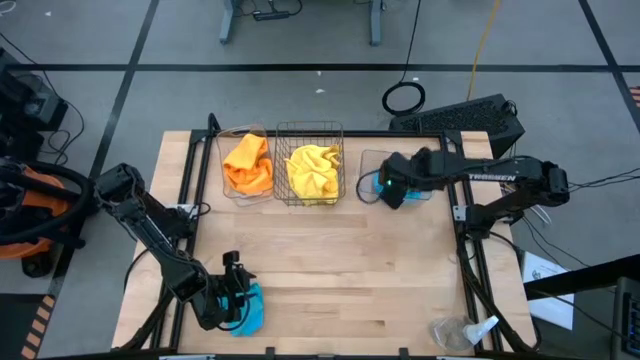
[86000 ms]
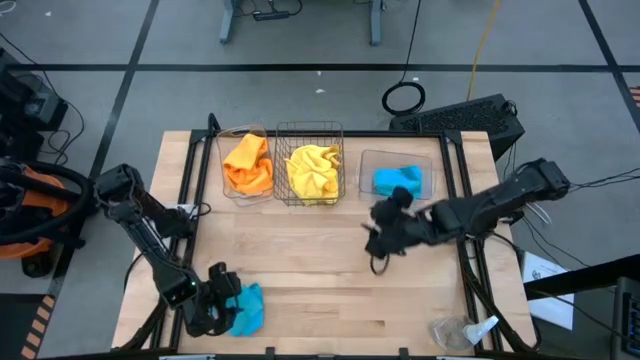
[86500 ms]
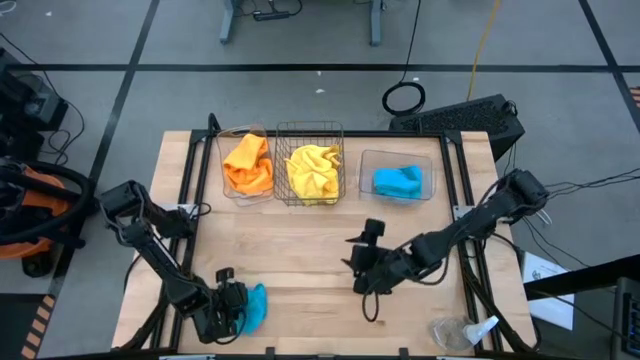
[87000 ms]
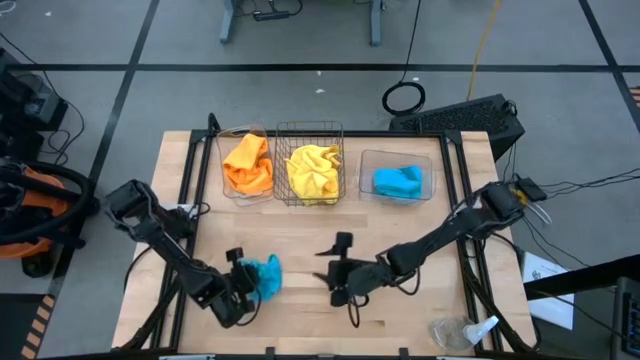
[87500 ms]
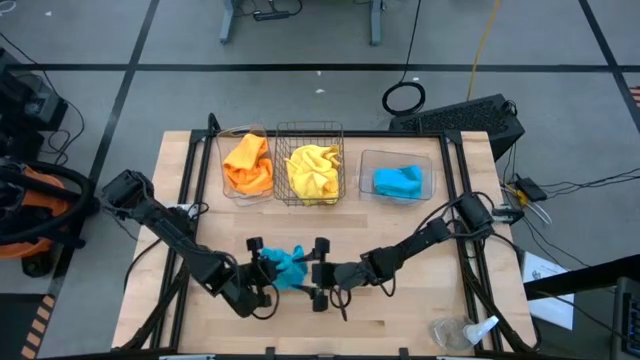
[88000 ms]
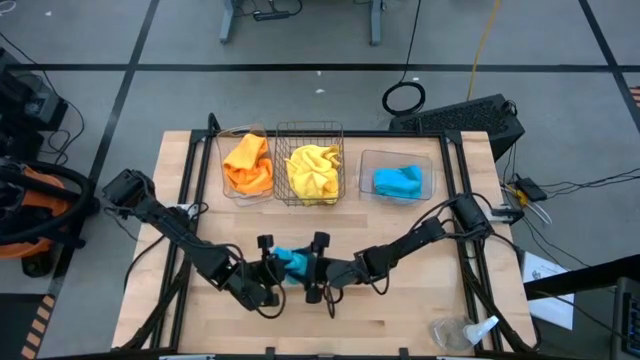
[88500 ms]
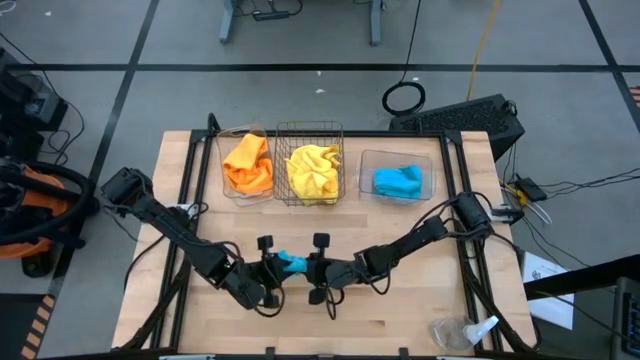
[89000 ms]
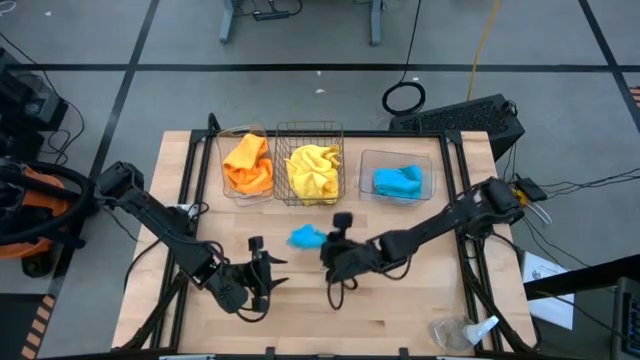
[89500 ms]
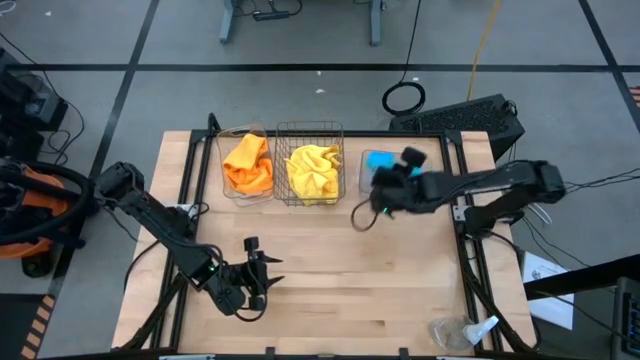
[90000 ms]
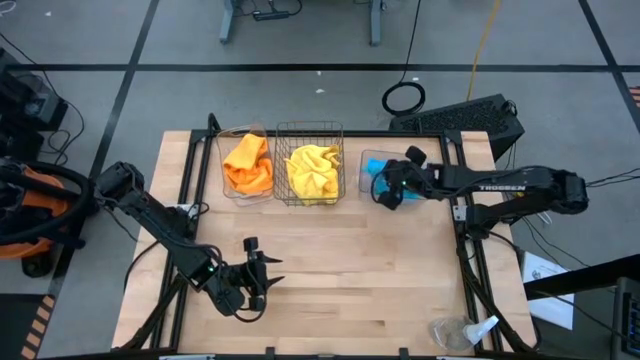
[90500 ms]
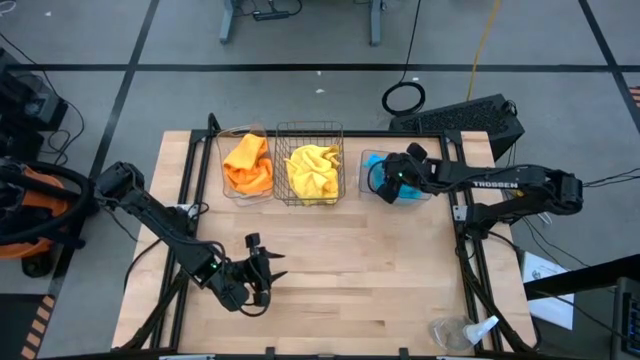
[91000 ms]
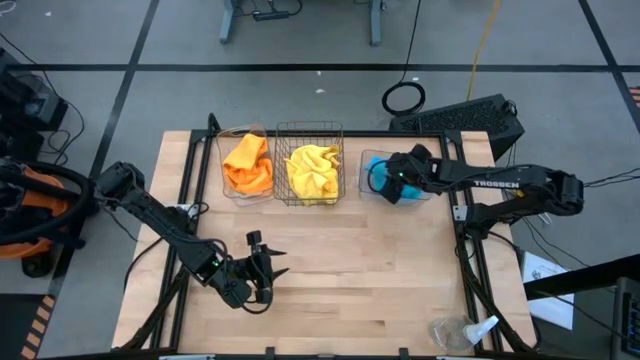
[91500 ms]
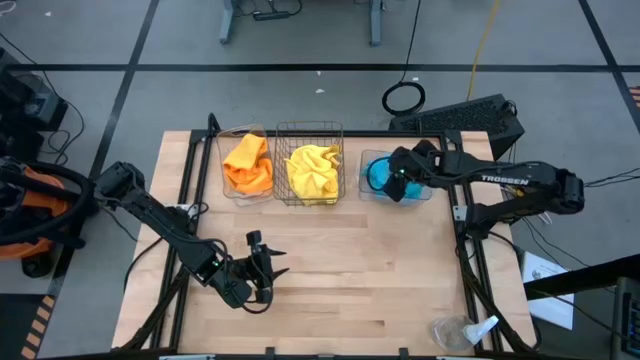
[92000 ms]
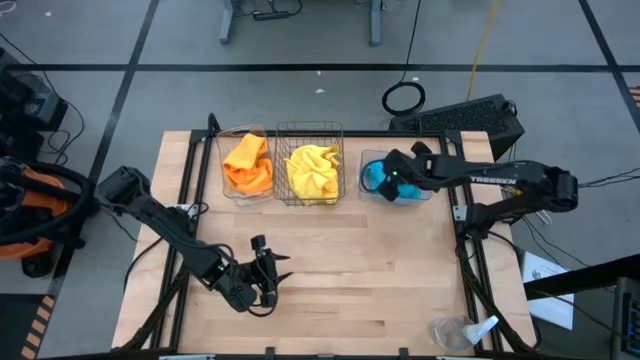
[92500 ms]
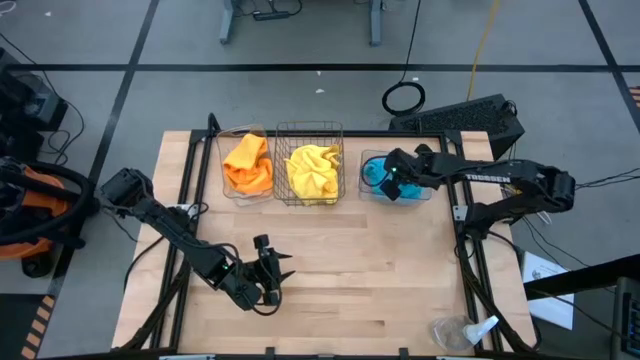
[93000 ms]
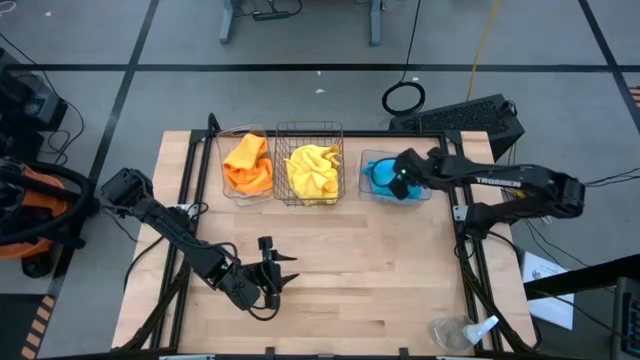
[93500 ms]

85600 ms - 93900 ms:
Task: Sort microfiber towel by color & place in baskets
Put the blue microfiber cloth into the right transparent bin

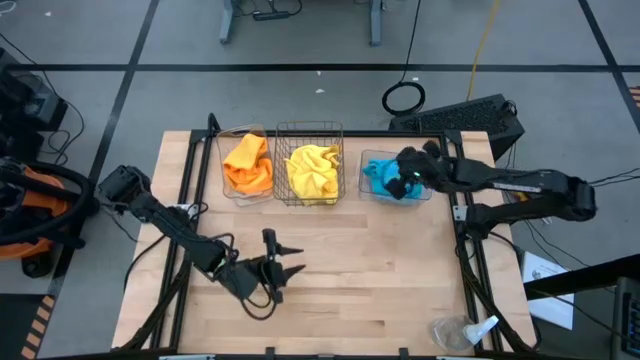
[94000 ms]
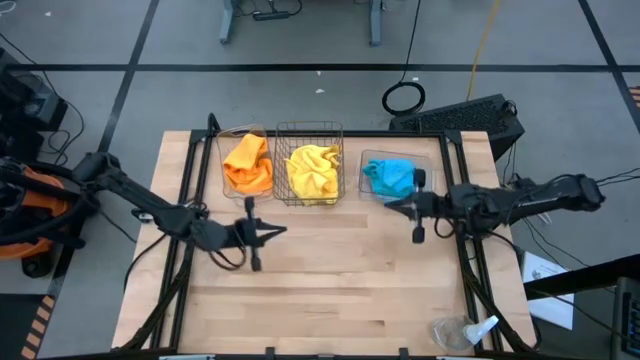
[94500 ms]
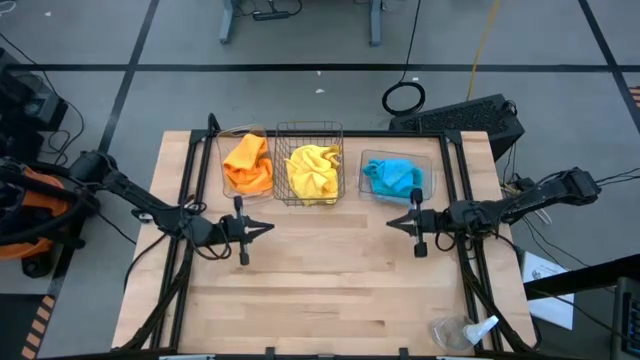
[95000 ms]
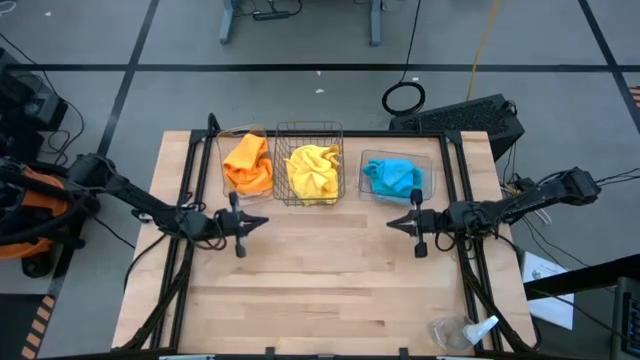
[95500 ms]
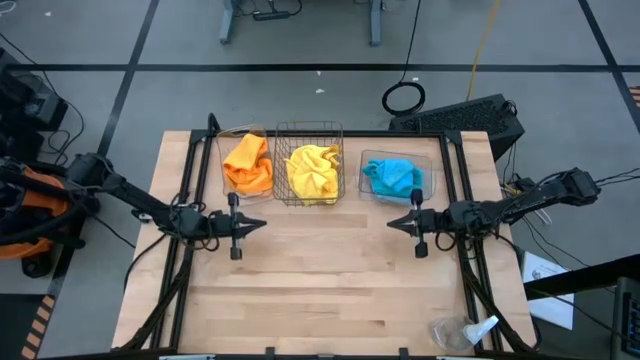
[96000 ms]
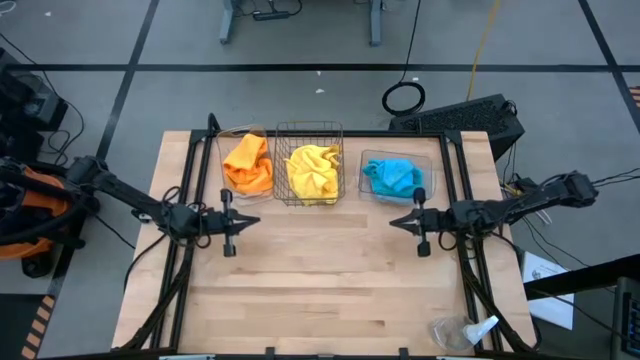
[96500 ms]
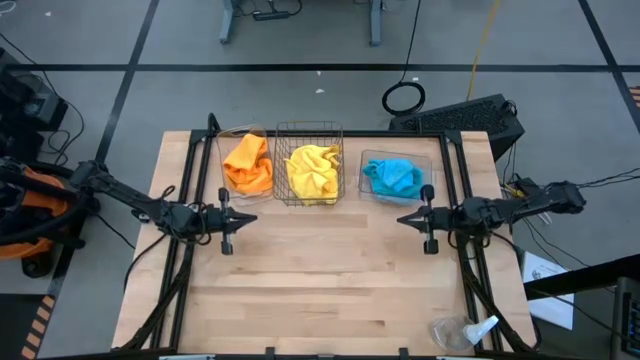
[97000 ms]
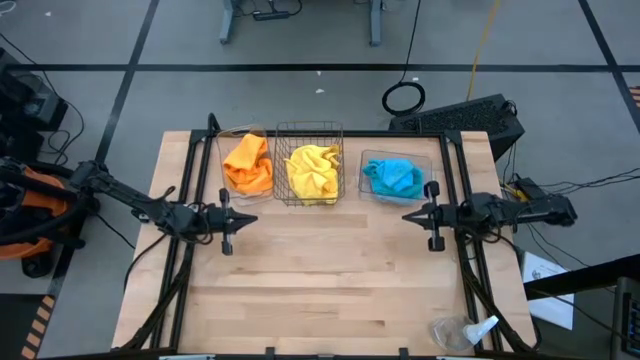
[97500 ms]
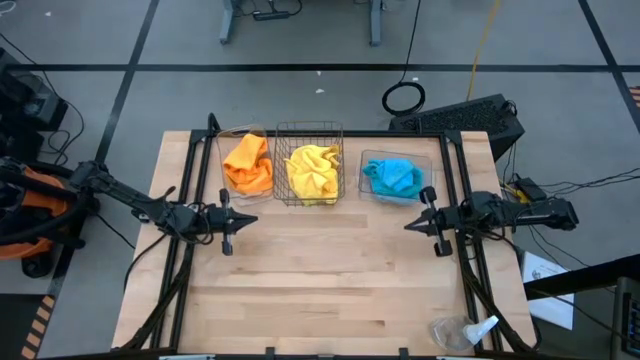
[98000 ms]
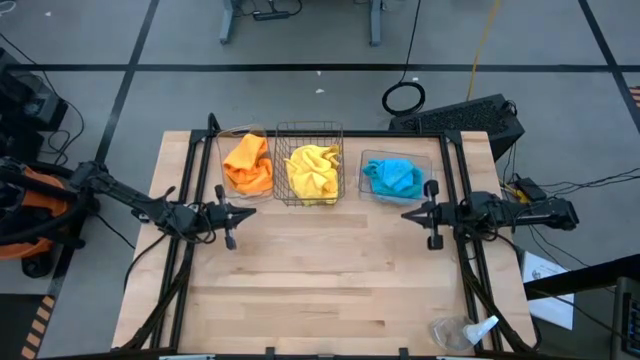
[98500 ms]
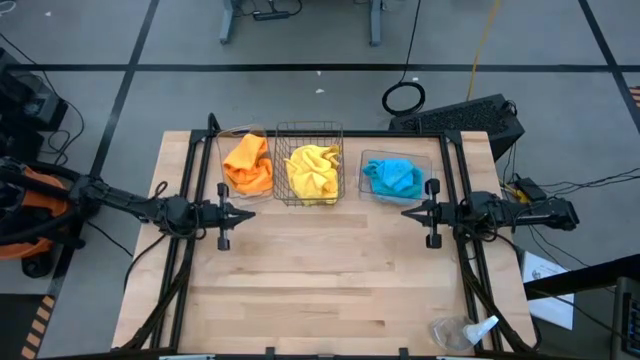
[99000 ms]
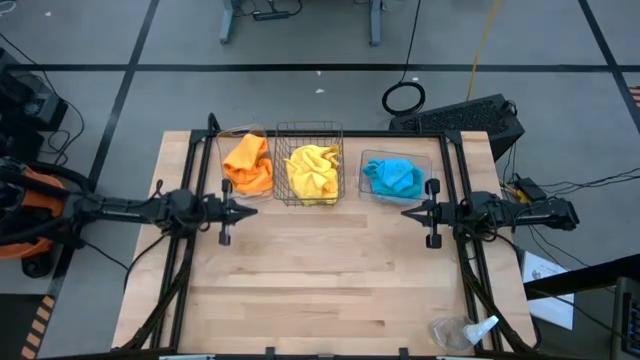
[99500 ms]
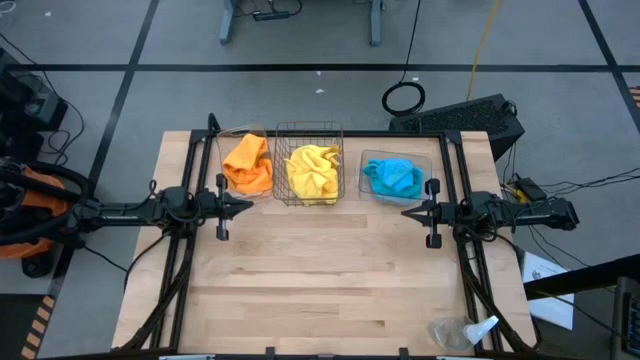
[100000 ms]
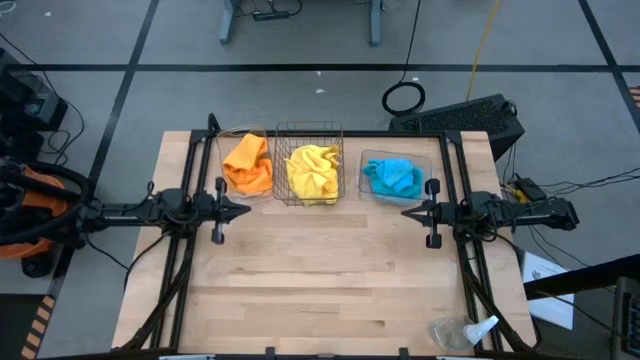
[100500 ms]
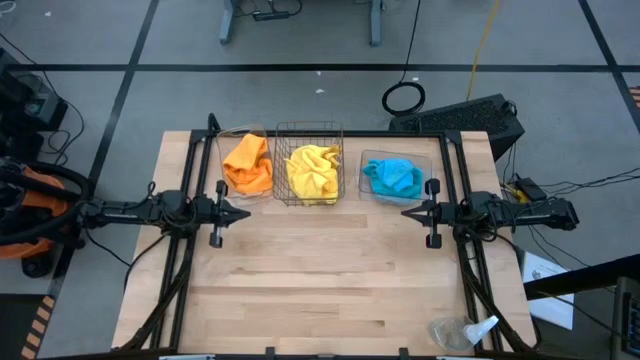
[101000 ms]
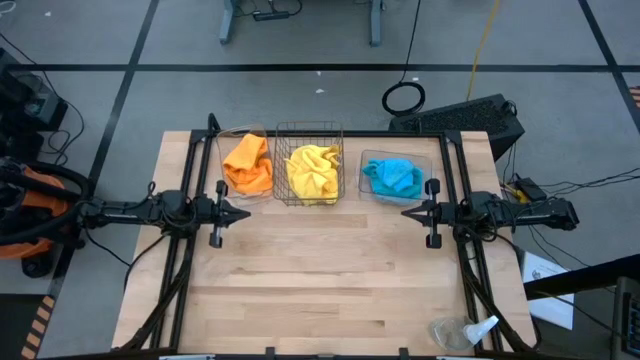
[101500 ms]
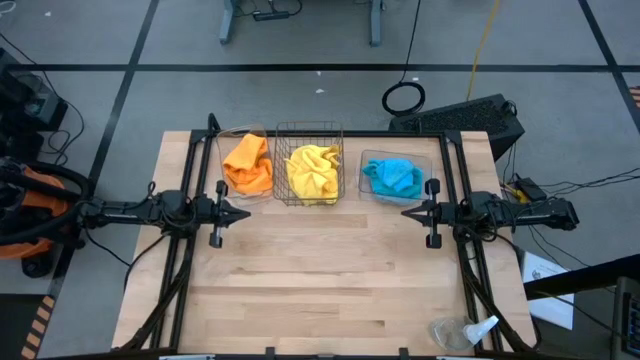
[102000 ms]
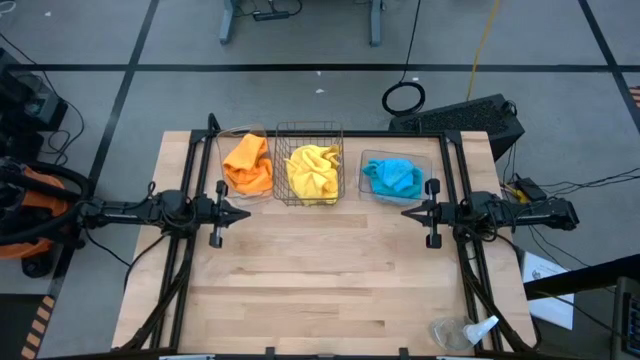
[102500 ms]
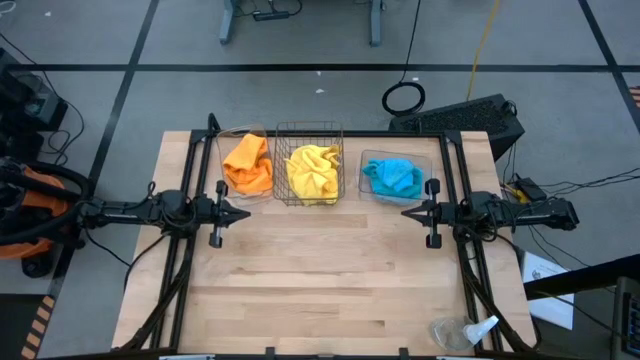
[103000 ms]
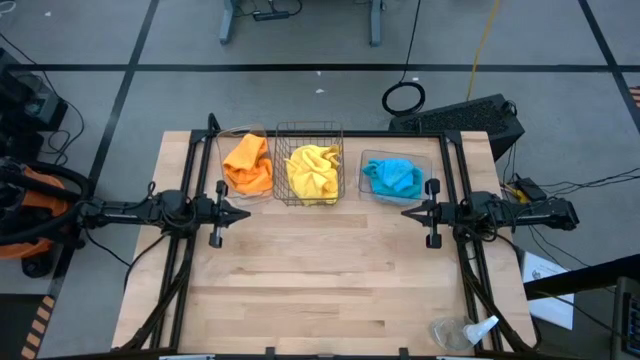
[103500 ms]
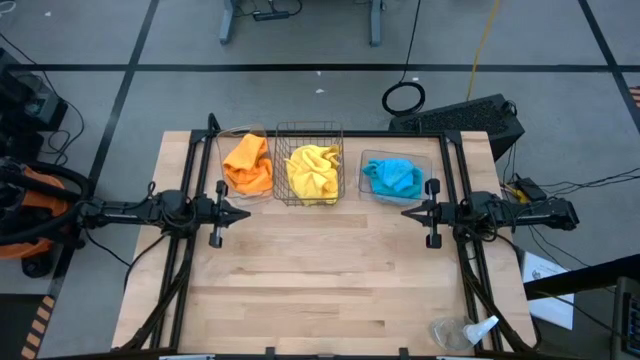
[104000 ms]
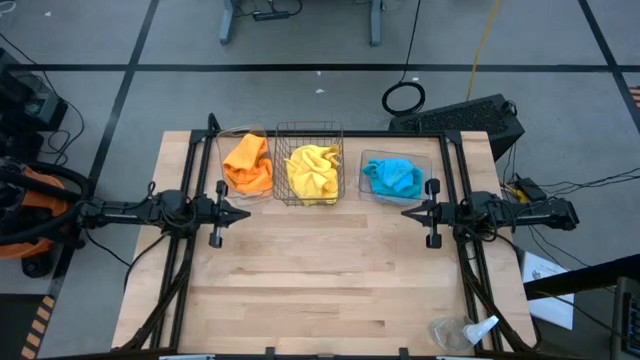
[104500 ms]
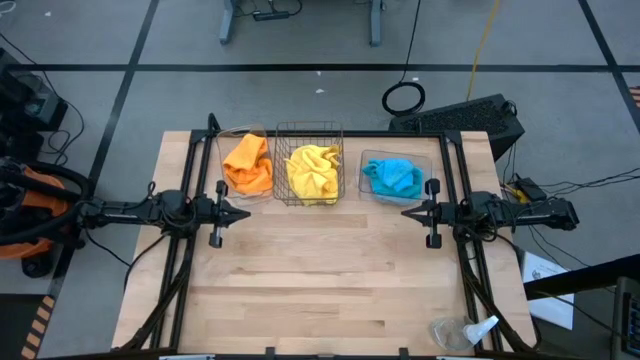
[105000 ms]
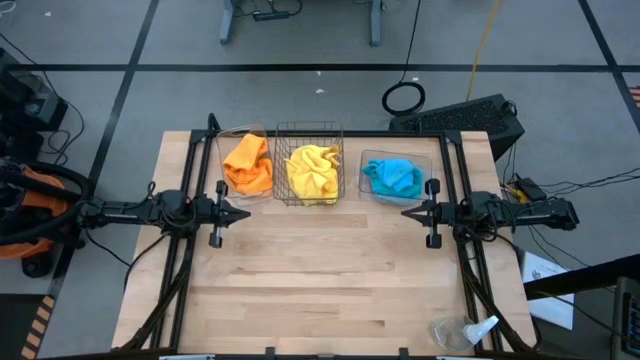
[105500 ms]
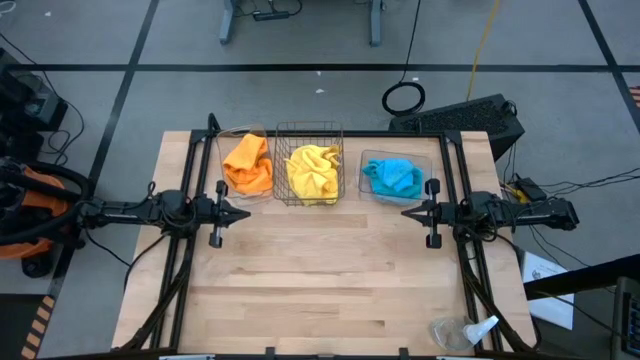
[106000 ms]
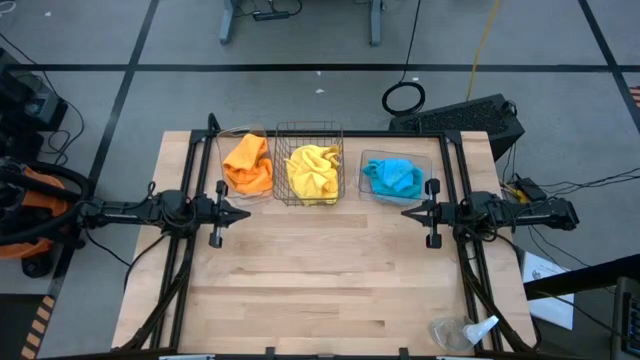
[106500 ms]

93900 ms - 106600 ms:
Return to Home Position
